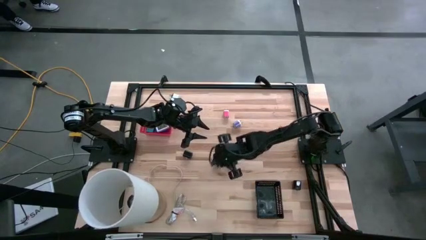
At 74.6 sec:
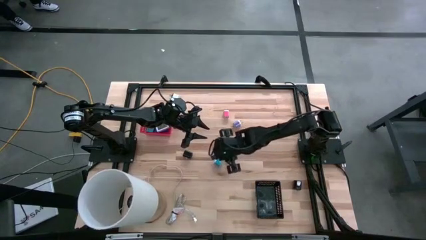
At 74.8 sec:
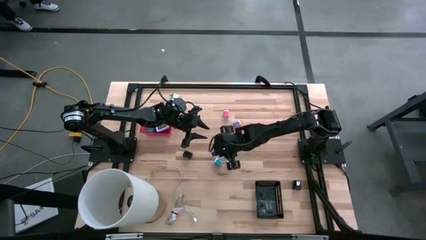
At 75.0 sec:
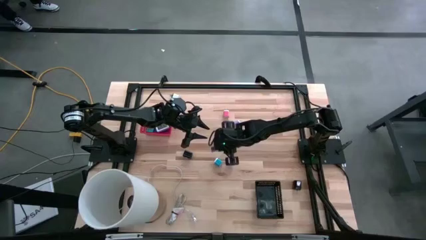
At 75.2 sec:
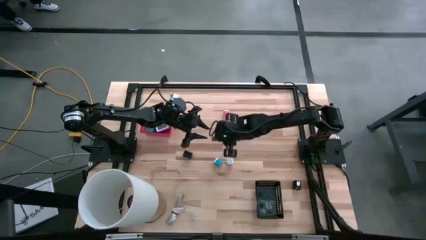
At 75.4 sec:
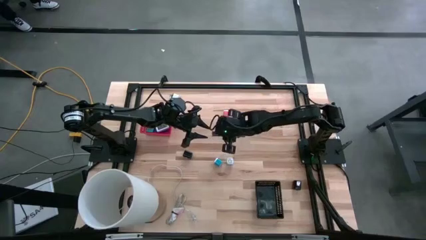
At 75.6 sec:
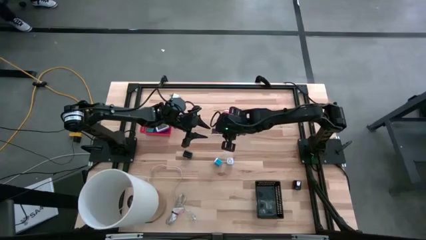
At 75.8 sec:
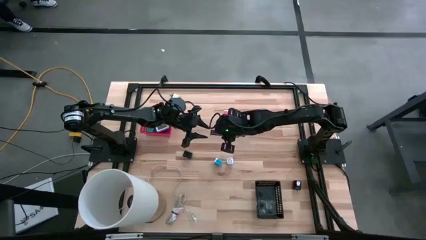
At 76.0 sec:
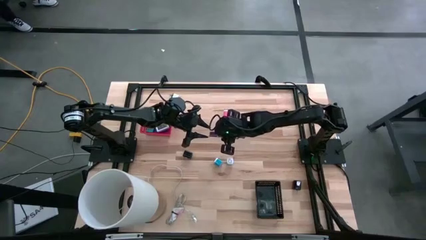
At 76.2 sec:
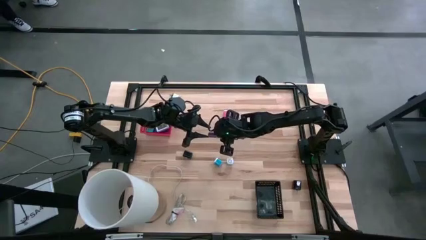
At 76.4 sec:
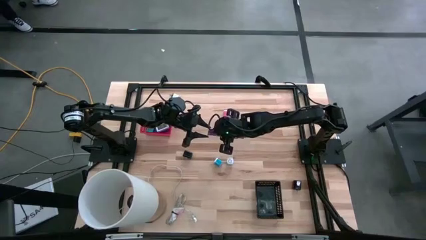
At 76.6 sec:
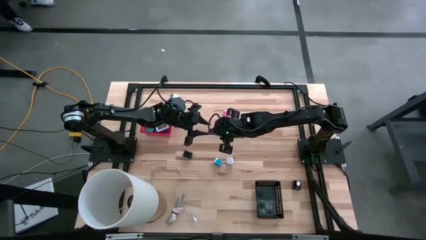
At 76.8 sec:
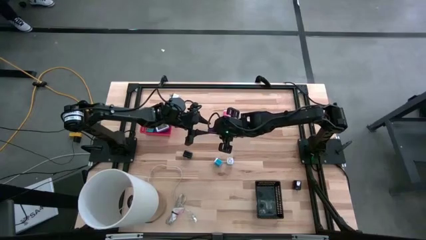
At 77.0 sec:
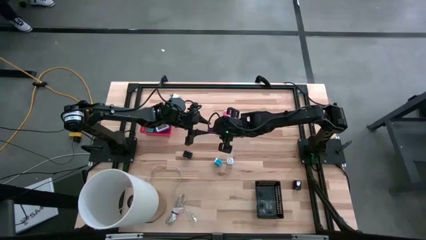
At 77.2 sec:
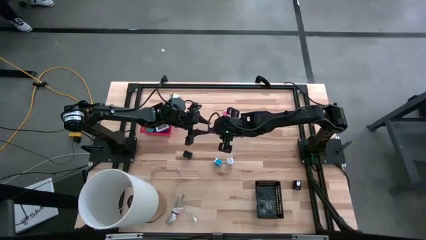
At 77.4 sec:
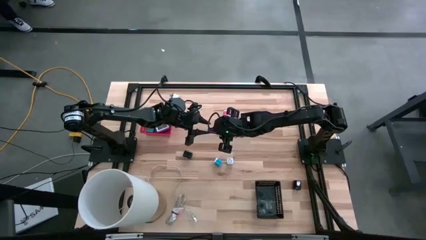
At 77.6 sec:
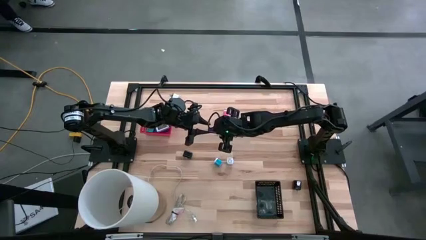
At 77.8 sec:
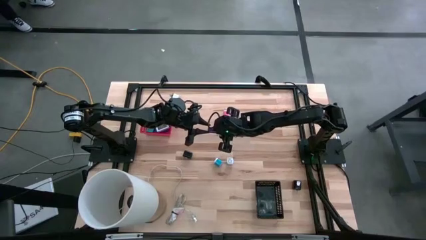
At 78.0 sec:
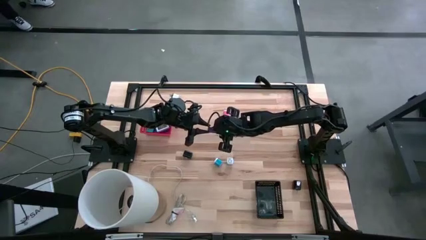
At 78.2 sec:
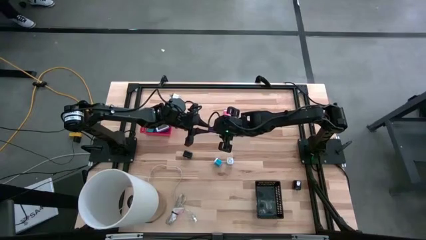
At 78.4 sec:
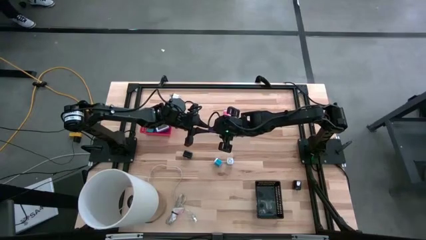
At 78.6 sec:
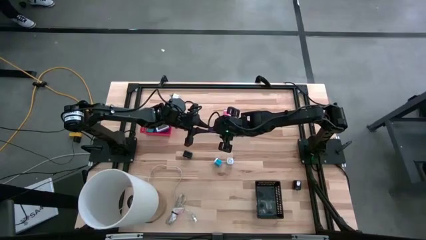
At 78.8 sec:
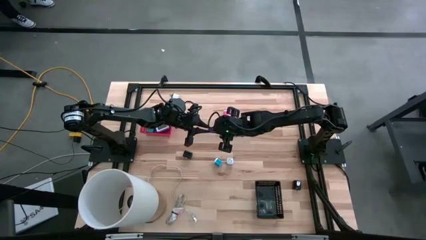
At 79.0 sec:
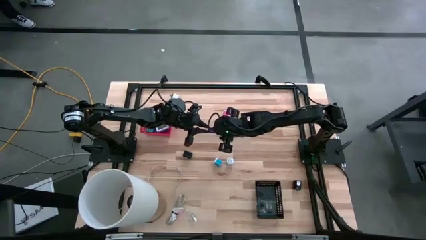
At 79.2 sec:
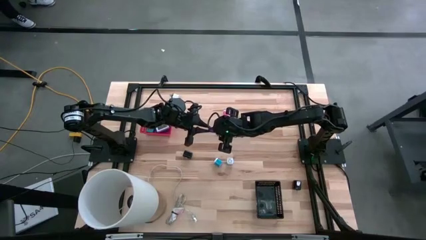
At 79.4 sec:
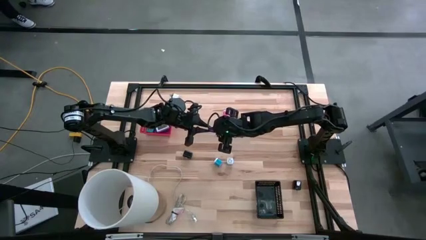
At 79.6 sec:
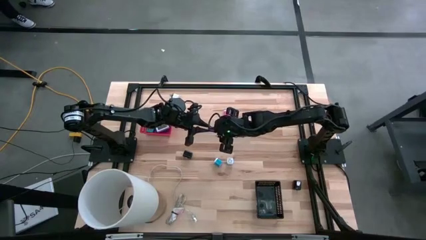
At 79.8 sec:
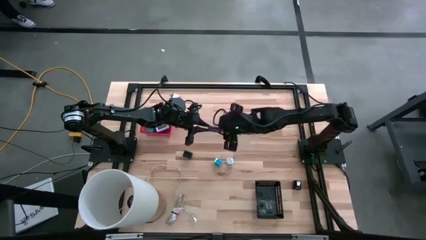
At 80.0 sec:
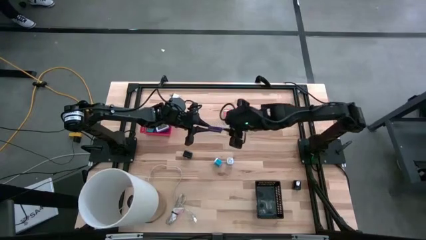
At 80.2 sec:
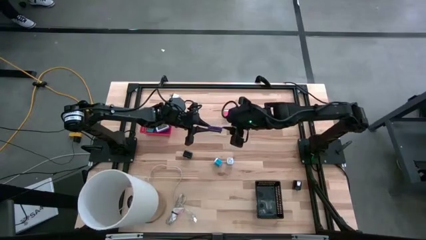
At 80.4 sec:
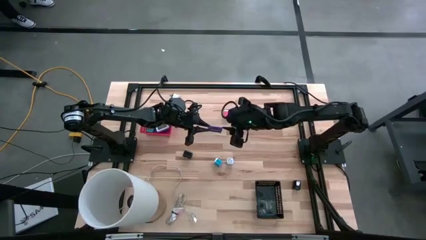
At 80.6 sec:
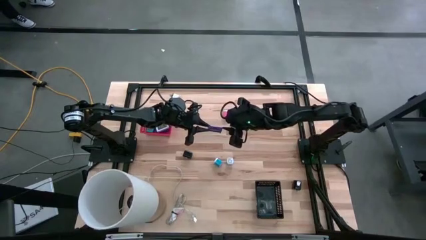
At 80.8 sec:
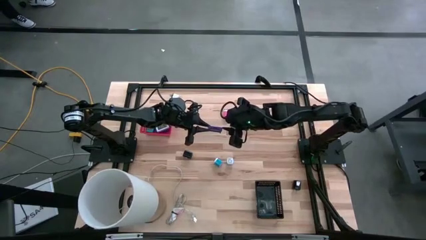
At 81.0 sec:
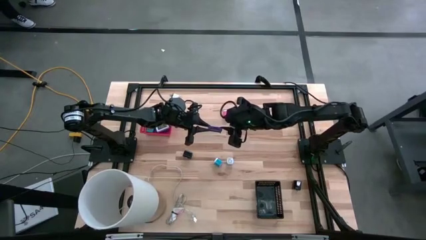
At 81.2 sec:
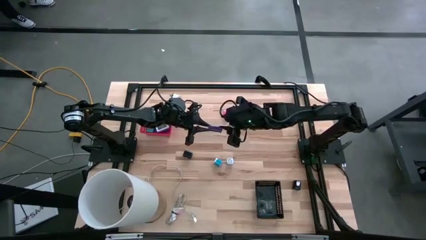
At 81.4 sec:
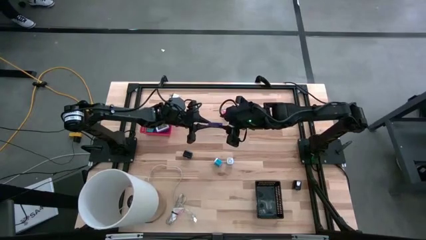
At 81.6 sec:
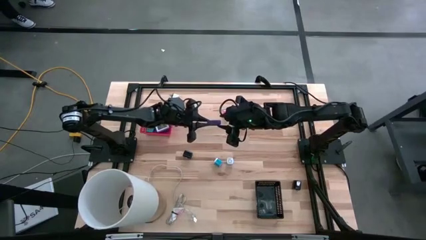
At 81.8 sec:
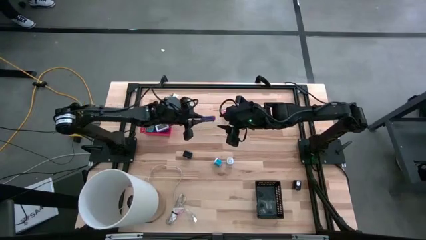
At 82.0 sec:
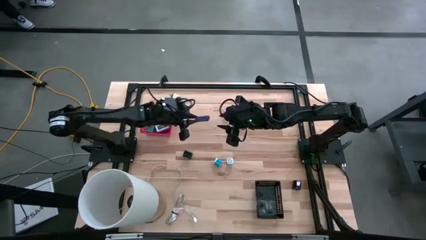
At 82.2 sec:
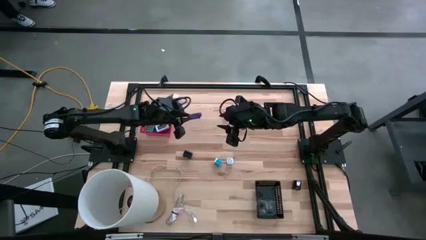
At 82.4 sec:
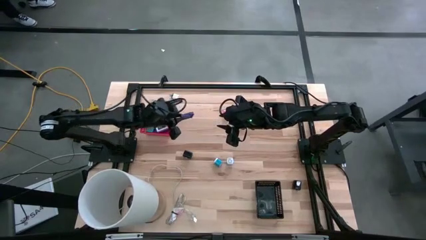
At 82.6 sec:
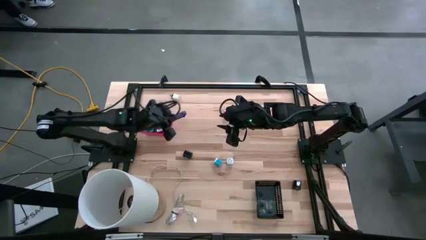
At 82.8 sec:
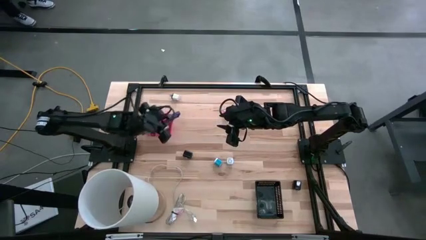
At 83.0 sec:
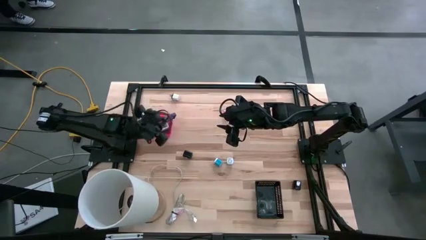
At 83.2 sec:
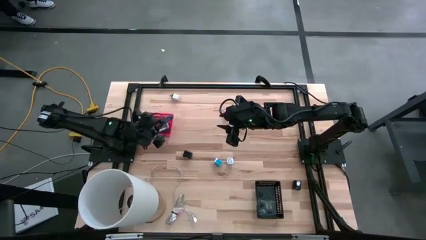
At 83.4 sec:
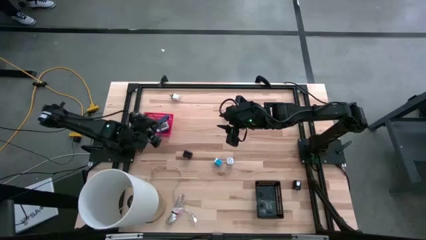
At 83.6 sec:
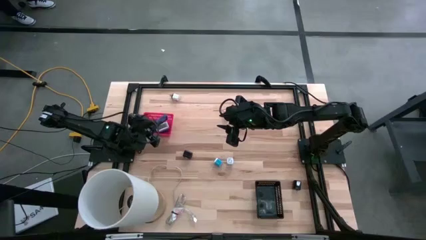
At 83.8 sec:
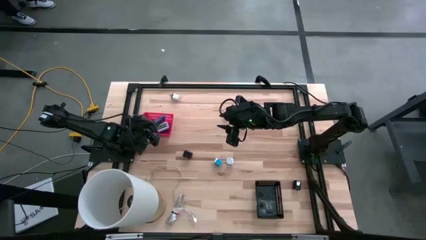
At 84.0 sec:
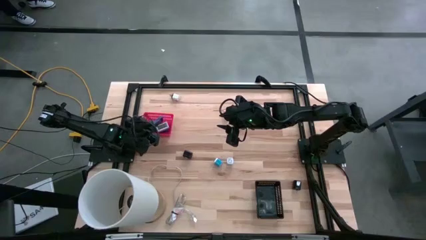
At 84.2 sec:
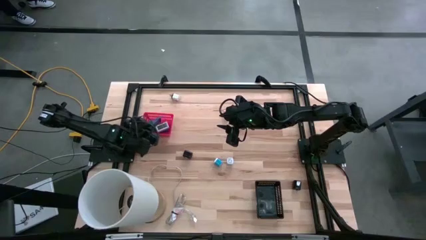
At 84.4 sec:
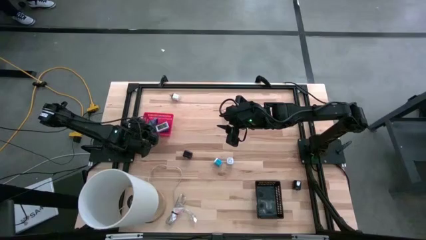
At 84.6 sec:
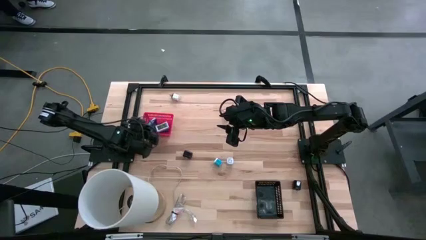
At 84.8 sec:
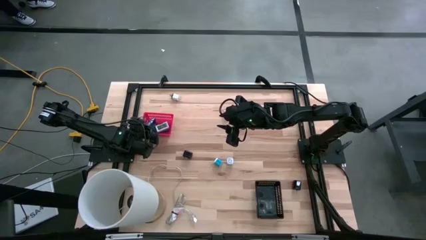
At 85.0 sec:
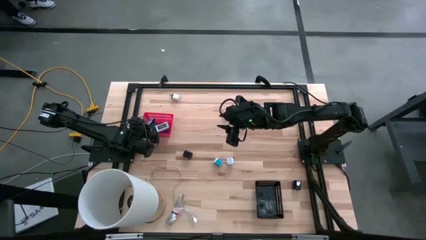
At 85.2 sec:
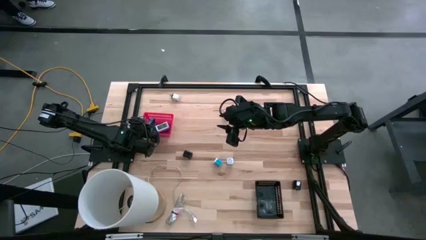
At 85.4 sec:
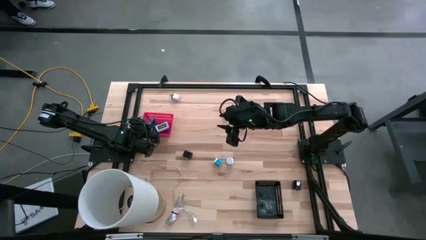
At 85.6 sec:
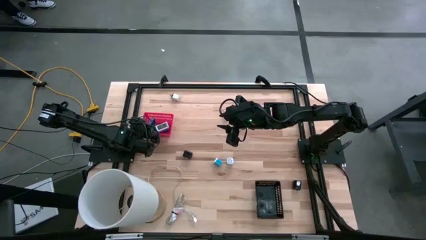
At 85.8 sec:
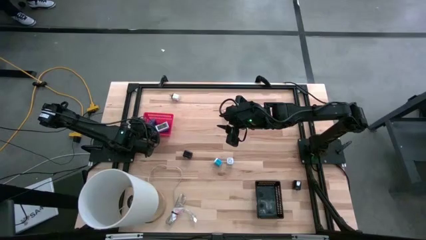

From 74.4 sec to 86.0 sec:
Task: Pick & Place Office items
Put the purple digital clock into the red bin
